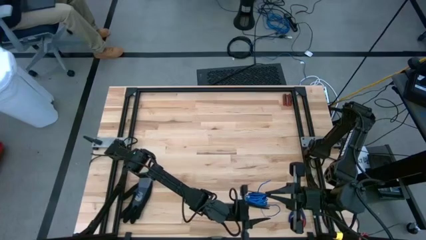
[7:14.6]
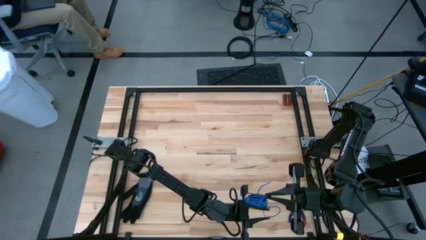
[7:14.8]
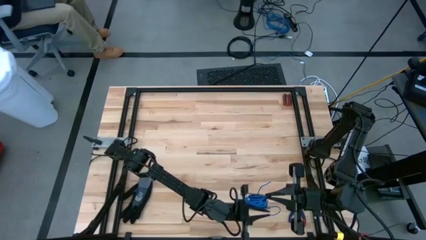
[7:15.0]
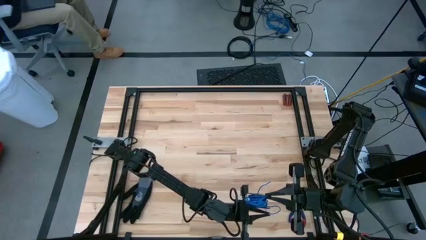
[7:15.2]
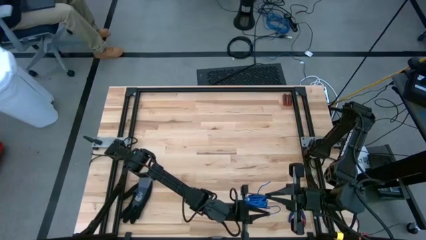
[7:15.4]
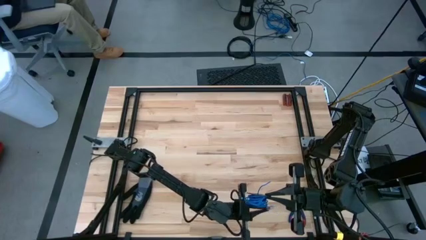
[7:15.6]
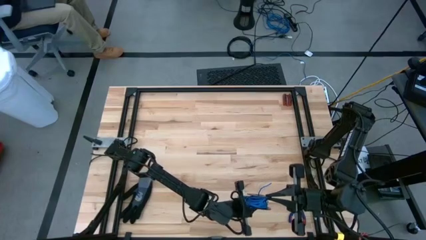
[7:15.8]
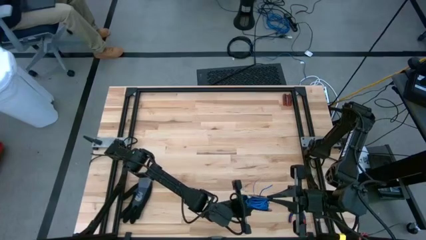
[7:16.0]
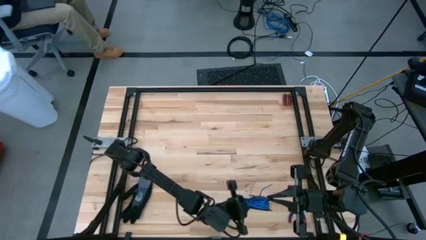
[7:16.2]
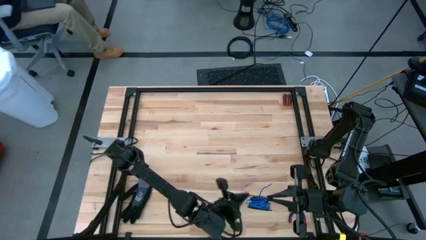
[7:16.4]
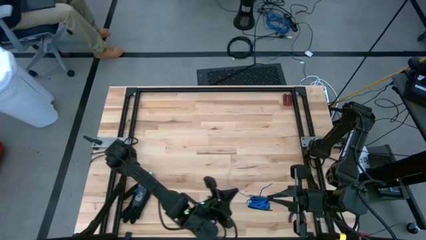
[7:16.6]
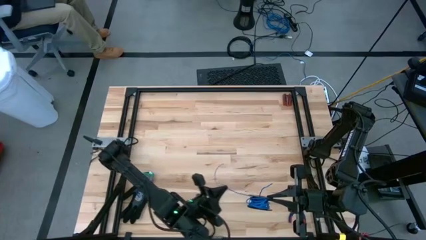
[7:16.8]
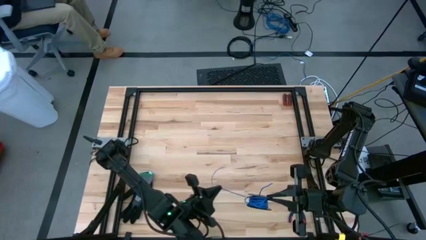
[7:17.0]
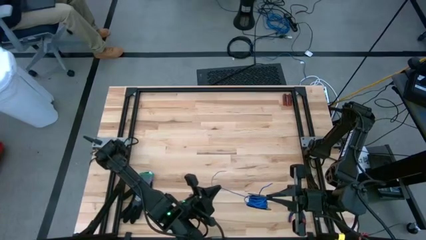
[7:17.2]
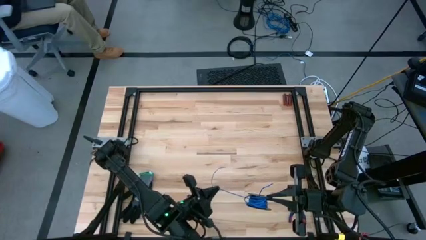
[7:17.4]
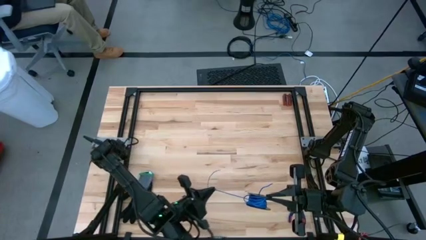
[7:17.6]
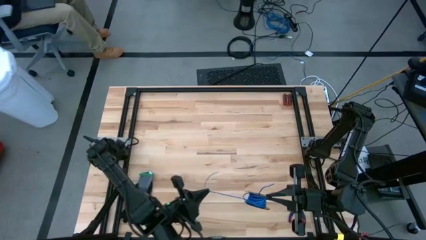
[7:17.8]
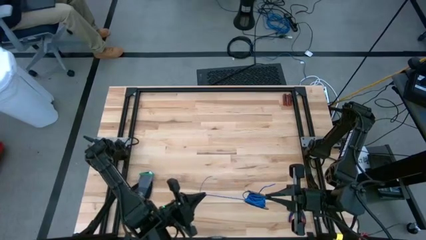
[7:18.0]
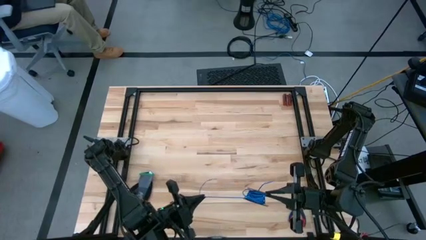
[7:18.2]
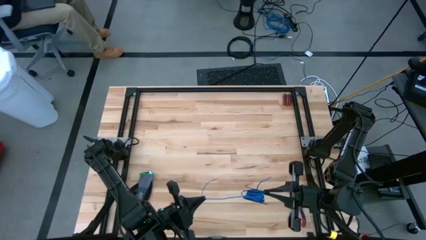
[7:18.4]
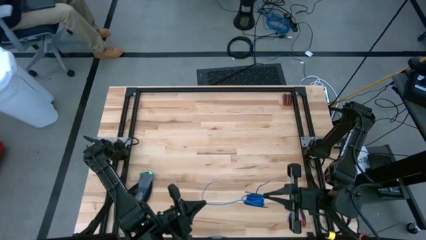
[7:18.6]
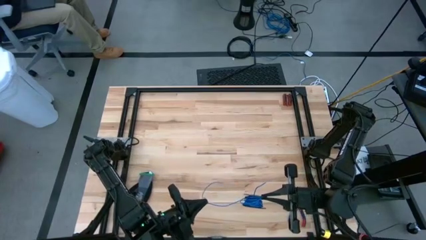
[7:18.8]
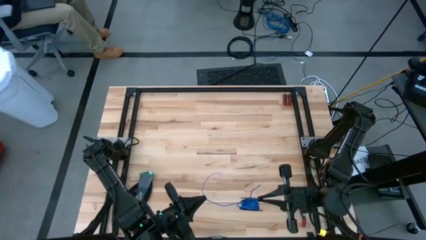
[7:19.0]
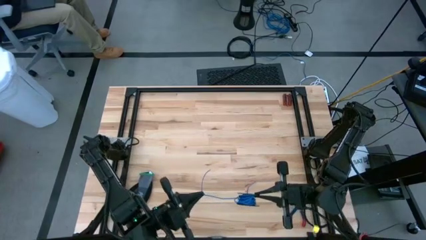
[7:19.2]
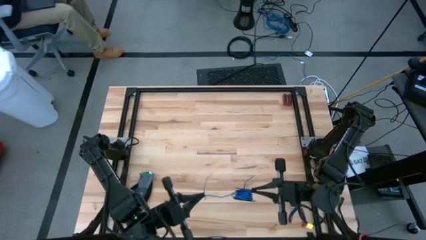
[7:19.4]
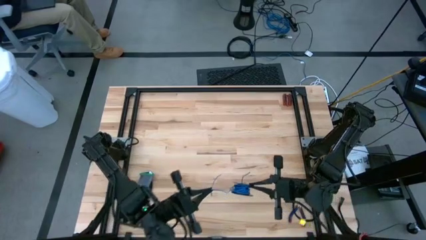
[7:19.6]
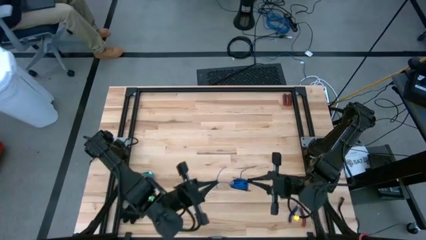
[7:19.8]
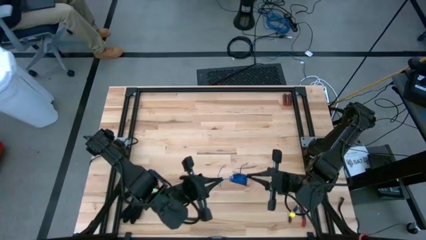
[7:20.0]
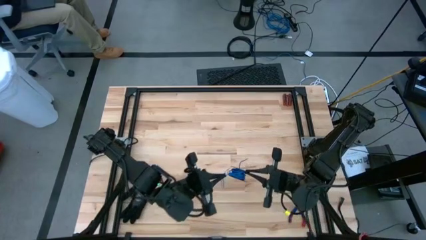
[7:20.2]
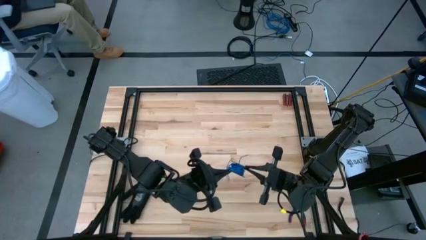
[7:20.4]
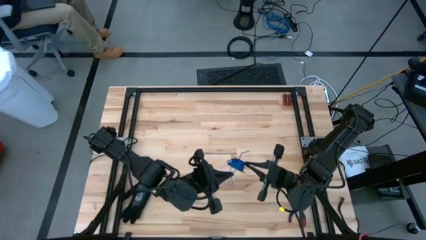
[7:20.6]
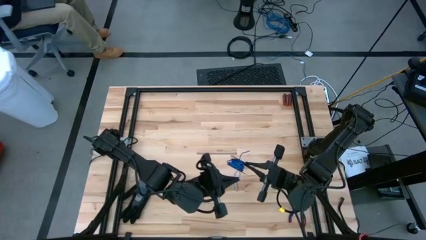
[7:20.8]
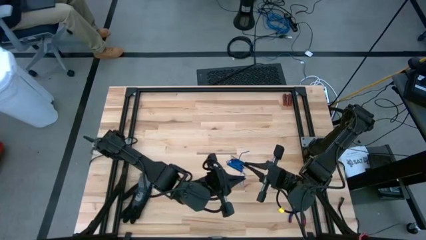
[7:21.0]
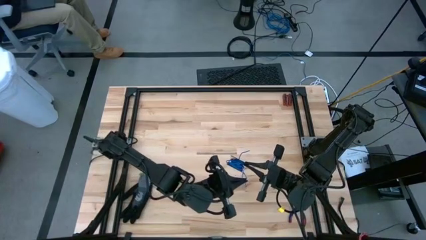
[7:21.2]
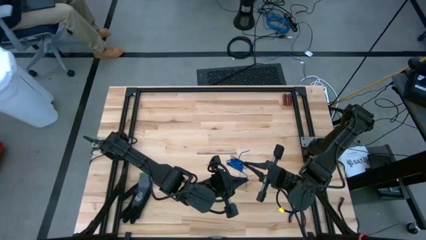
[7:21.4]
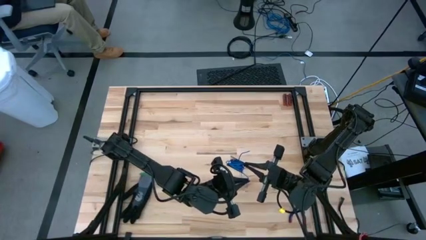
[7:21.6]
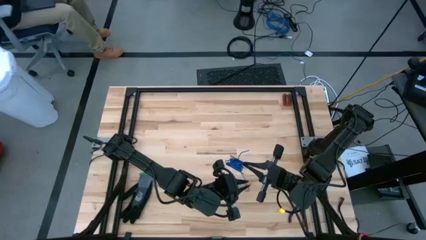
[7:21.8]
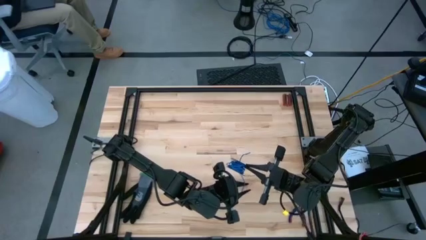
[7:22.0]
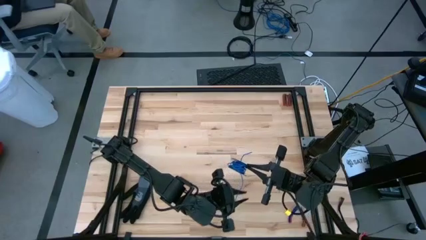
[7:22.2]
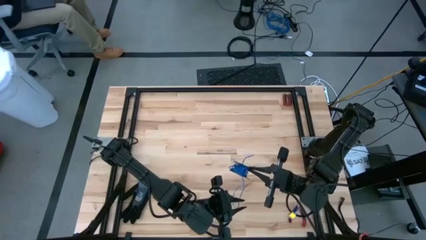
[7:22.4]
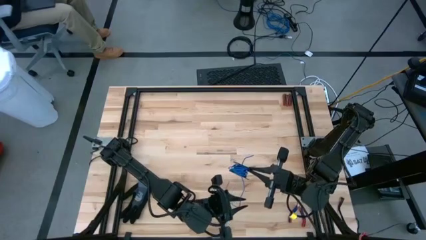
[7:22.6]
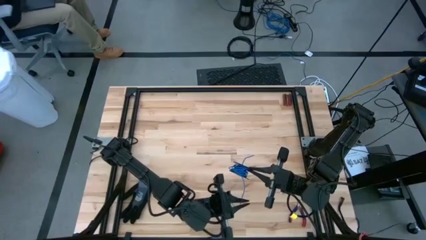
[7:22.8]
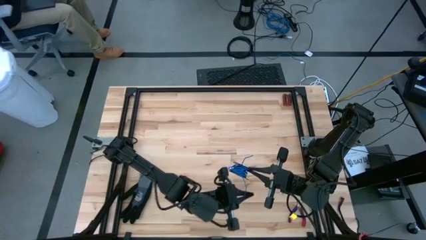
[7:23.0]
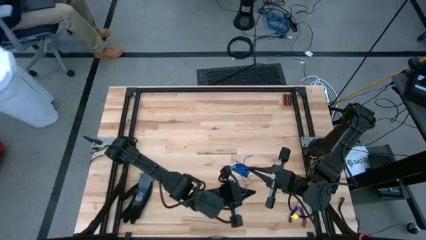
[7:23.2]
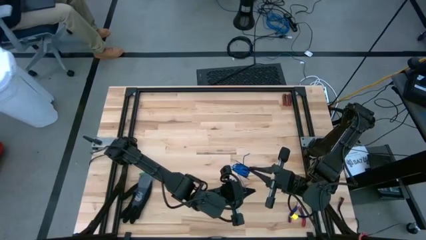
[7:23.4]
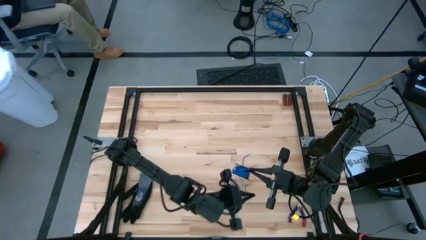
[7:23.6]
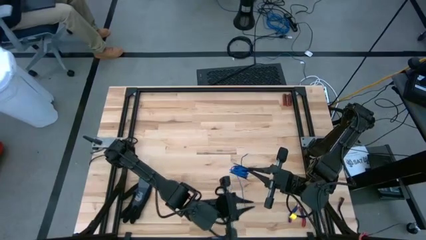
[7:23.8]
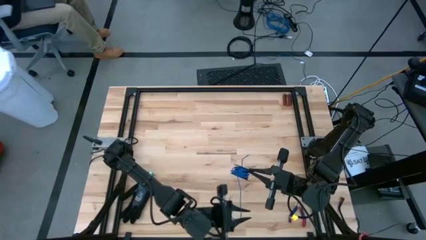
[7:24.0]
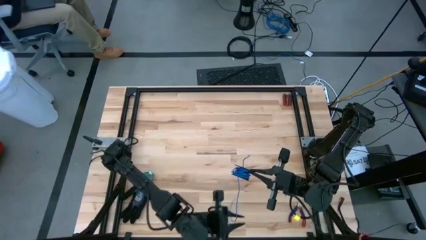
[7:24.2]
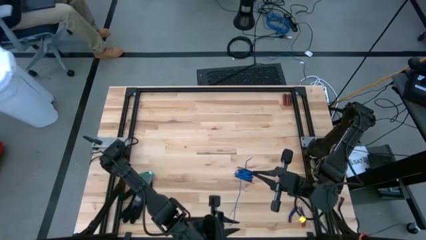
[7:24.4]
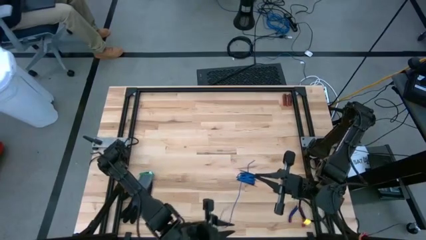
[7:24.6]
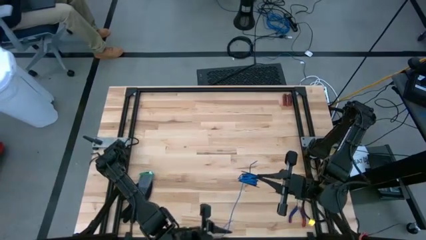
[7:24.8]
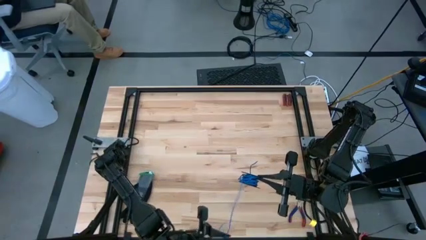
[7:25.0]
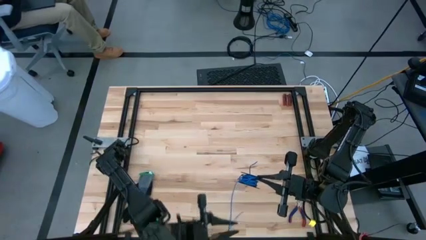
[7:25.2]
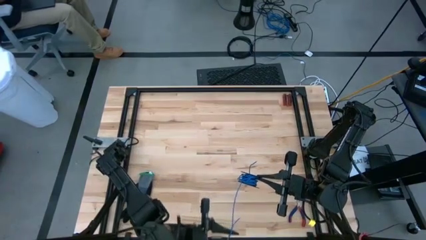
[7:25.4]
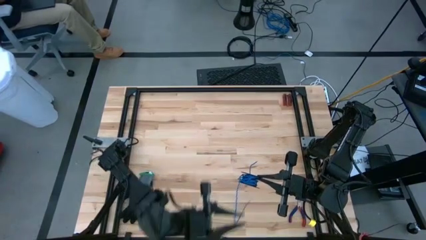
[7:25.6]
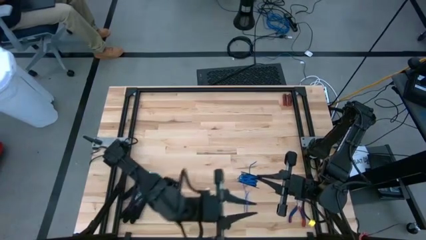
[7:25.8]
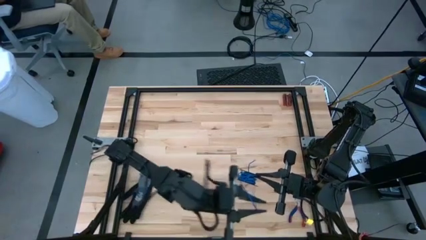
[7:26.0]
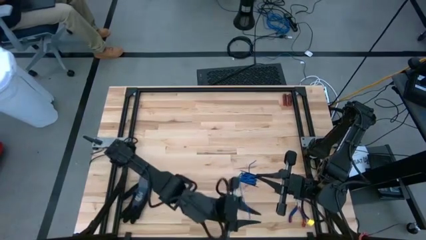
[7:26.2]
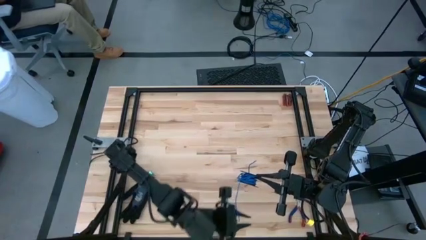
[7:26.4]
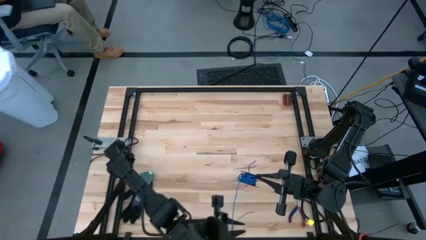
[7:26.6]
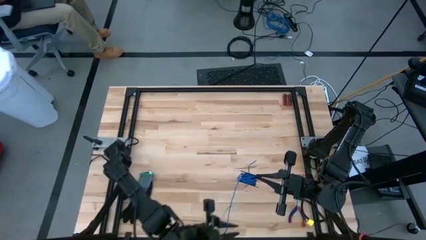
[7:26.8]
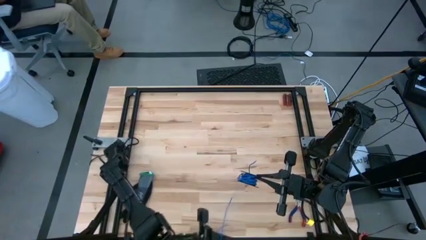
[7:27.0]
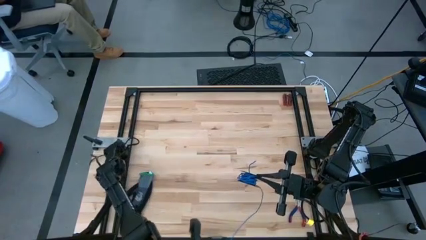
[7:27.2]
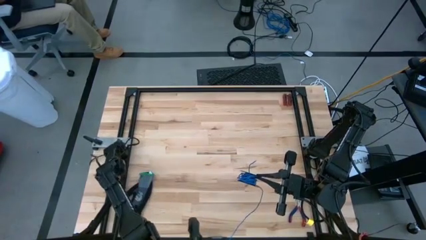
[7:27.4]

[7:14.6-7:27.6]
Task: Coil cords
Coil the blue wire onto the spool

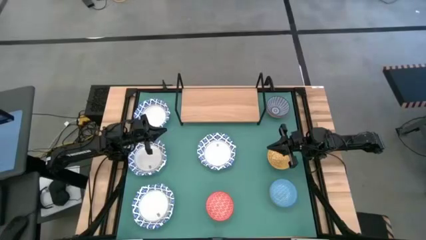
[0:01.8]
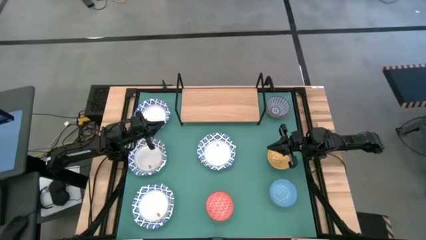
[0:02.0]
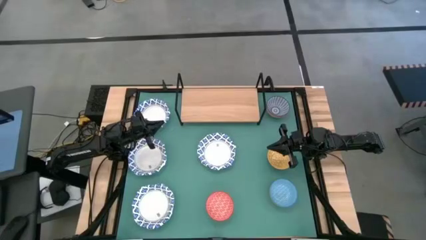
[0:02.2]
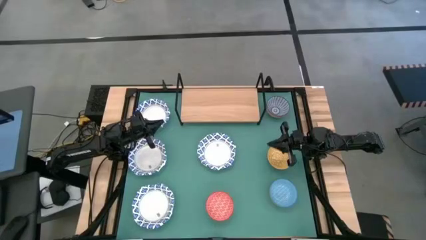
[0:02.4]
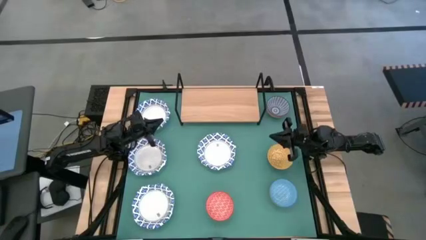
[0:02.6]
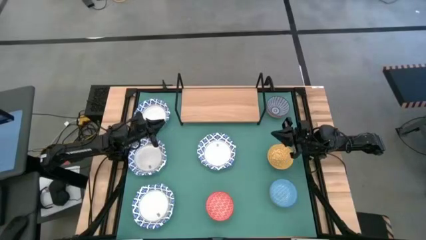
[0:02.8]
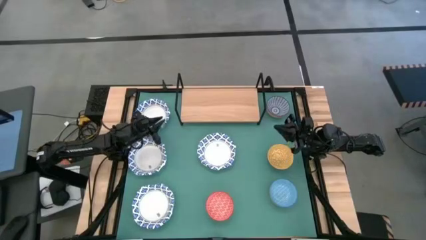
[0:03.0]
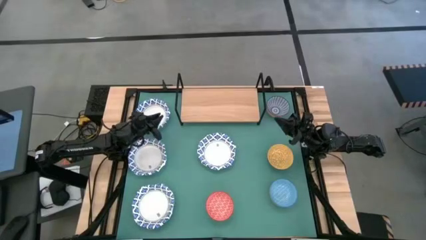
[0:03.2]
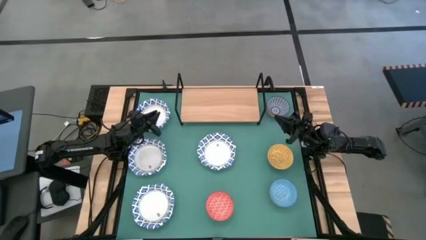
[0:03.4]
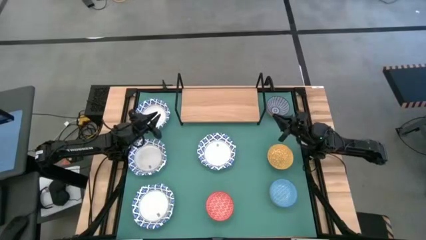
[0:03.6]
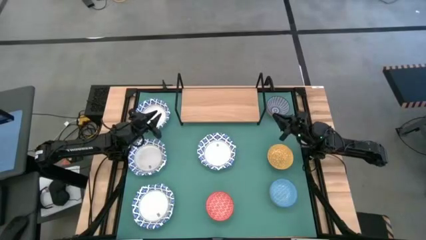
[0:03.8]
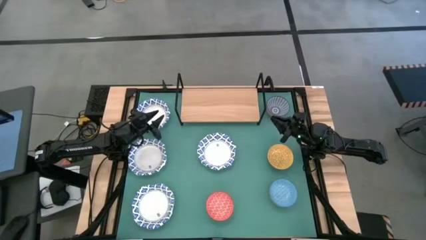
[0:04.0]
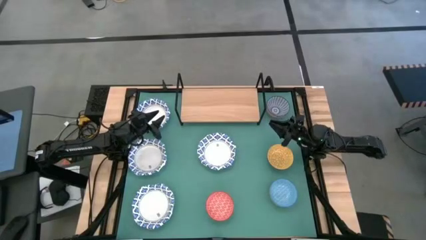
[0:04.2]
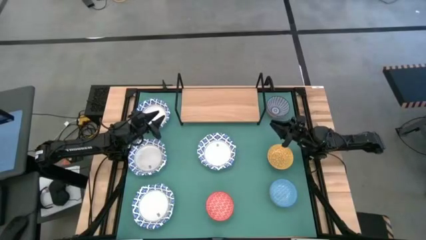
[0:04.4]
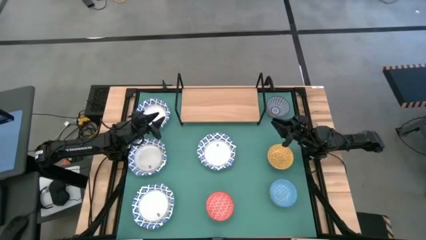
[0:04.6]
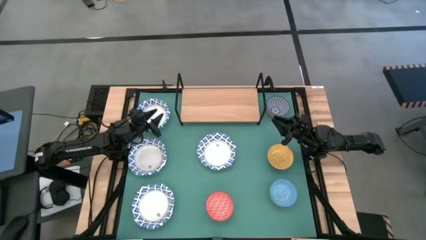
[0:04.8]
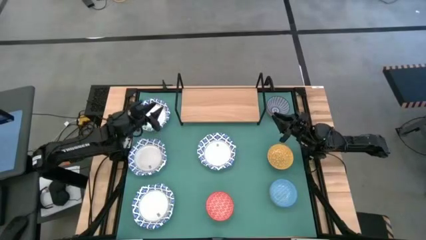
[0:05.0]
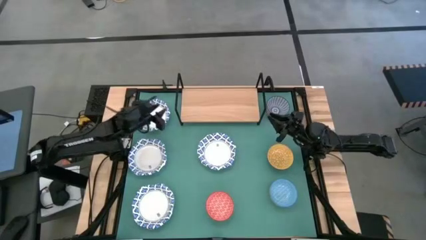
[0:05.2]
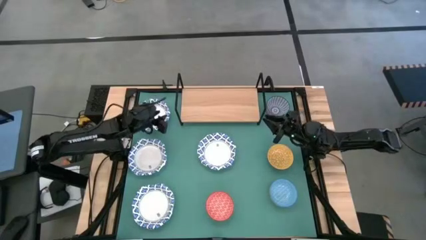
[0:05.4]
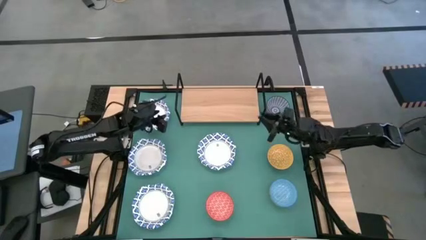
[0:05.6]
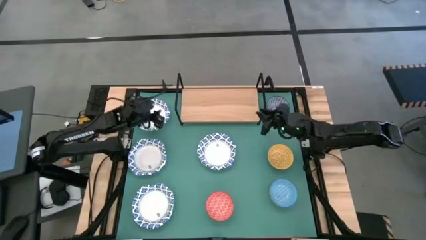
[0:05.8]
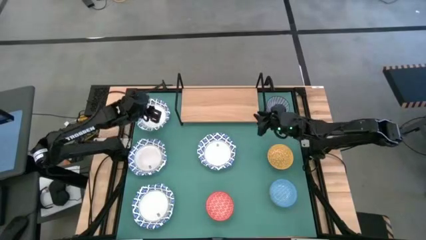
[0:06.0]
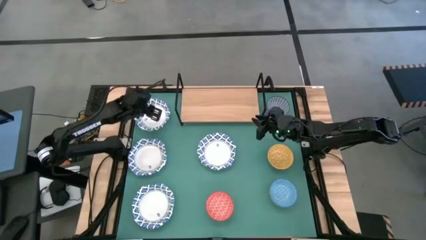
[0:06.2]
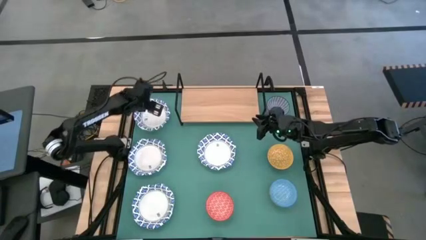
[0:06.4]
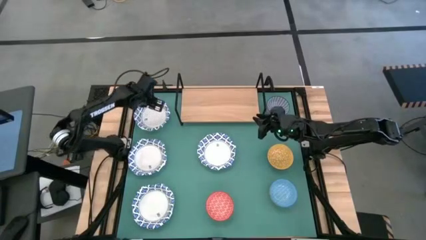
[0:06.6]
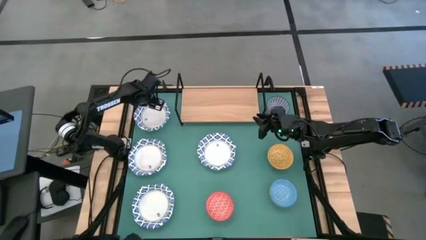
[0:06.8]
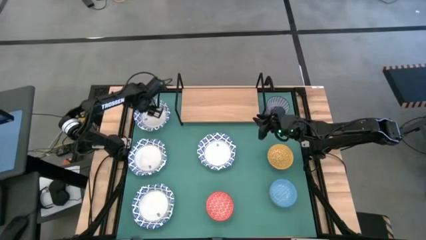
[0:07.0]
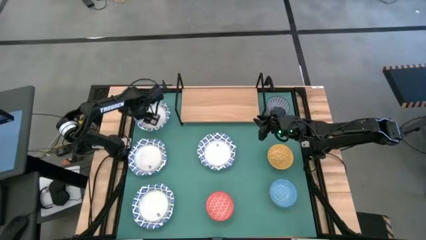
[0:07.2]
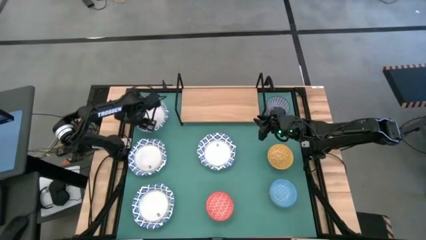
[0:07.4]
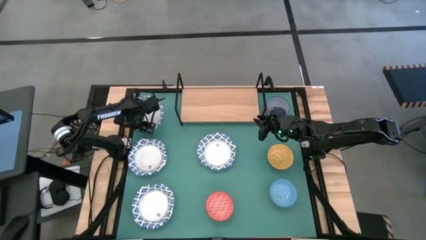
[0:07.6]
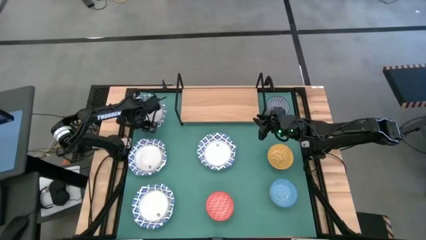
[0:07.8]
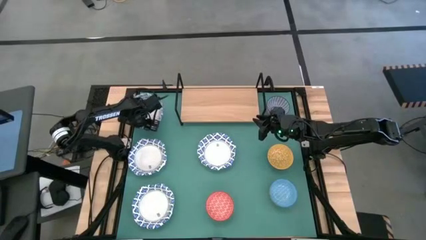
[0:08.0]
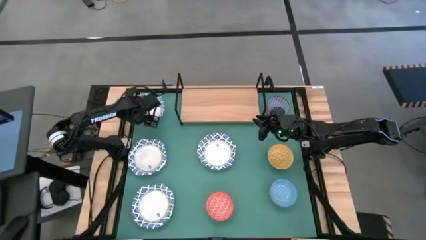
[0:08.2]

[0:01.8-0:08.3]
Task: Place and stack bowls onto a shelf
Put the white patterned bowl on the shelf
